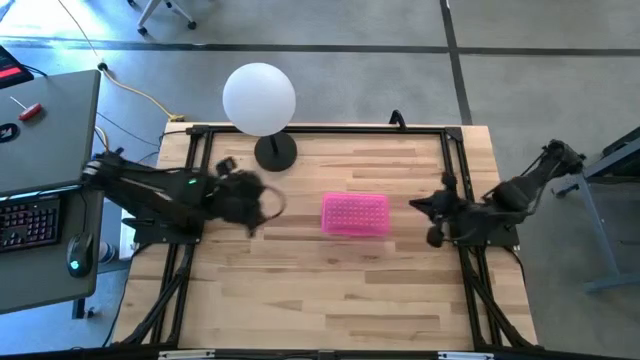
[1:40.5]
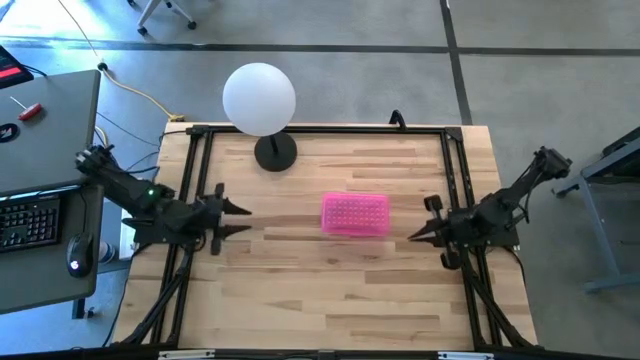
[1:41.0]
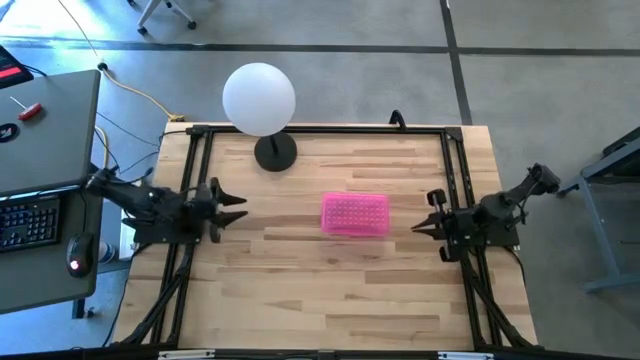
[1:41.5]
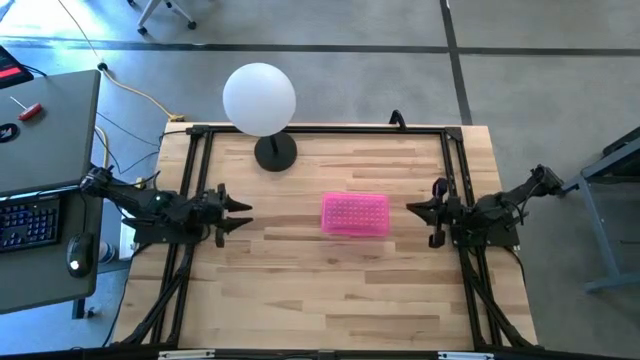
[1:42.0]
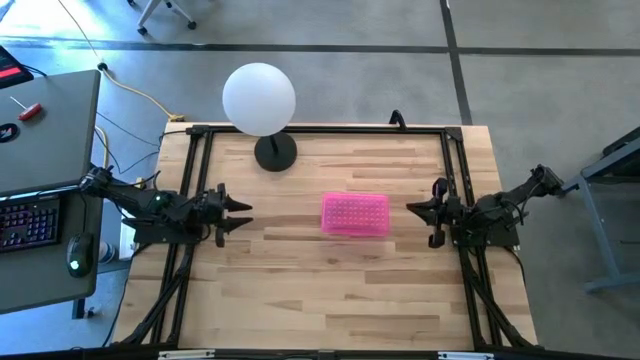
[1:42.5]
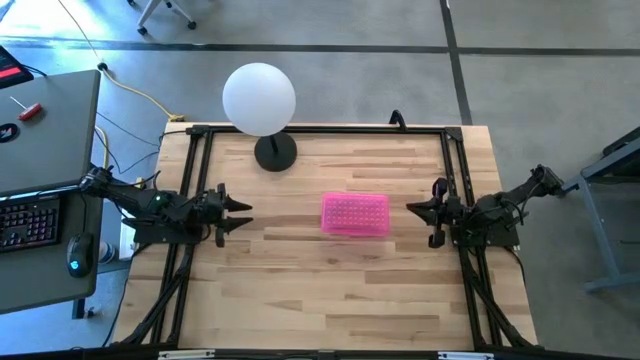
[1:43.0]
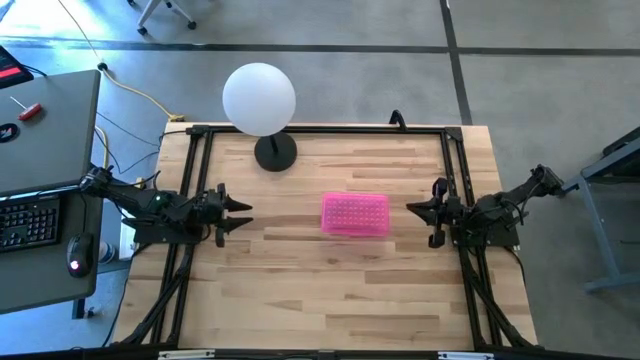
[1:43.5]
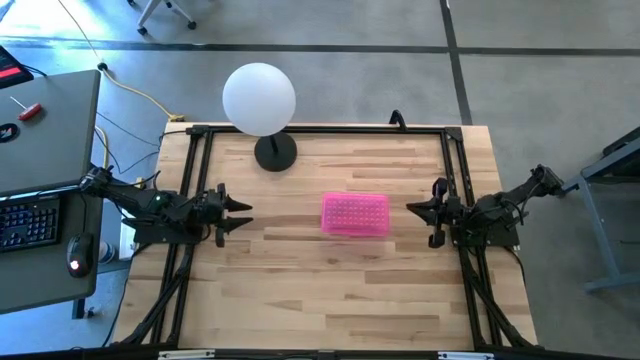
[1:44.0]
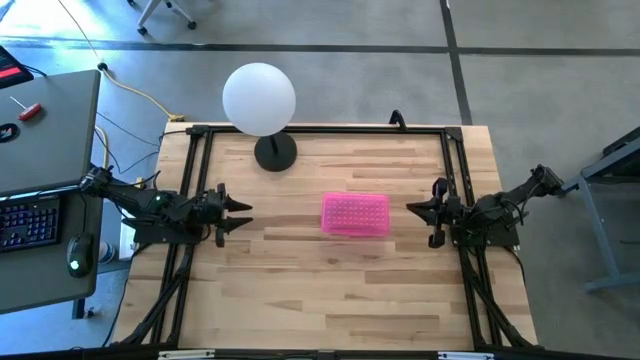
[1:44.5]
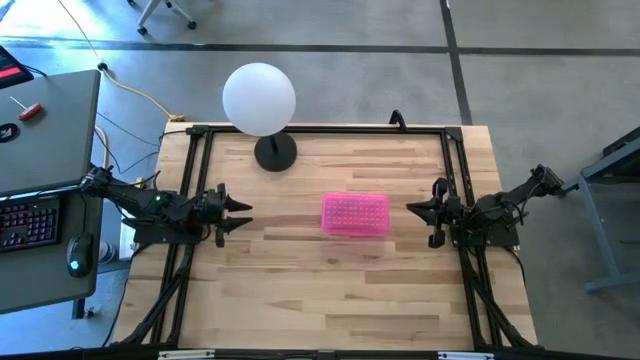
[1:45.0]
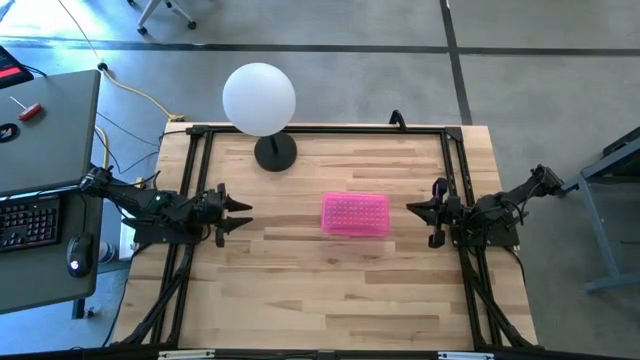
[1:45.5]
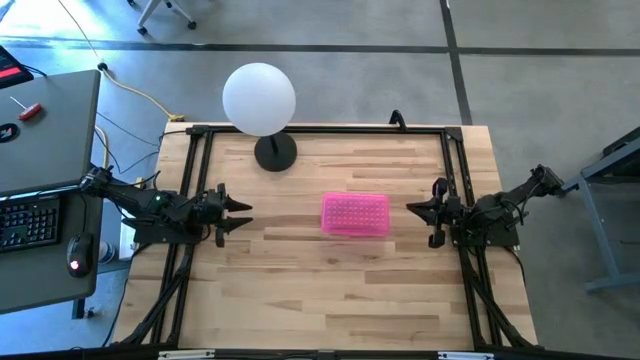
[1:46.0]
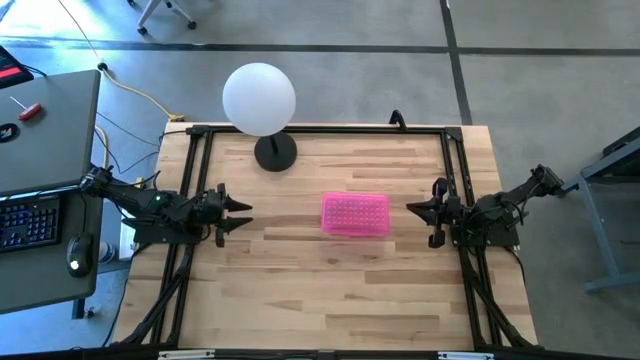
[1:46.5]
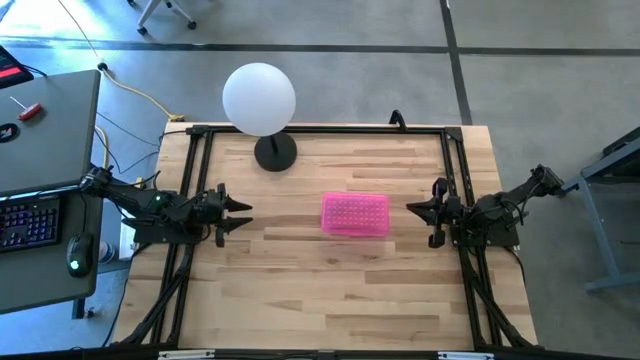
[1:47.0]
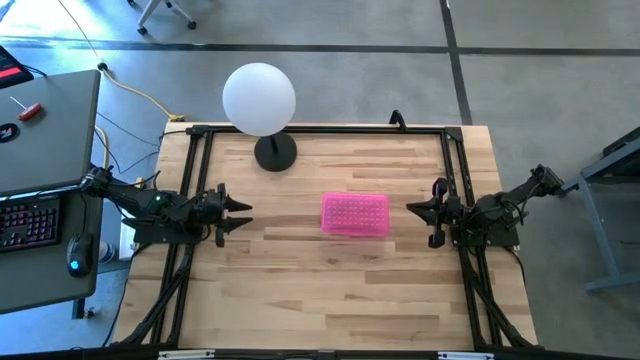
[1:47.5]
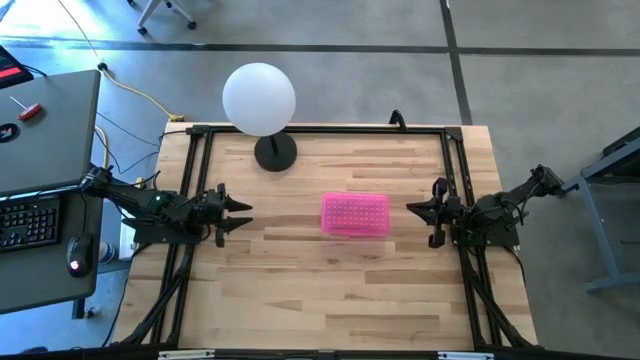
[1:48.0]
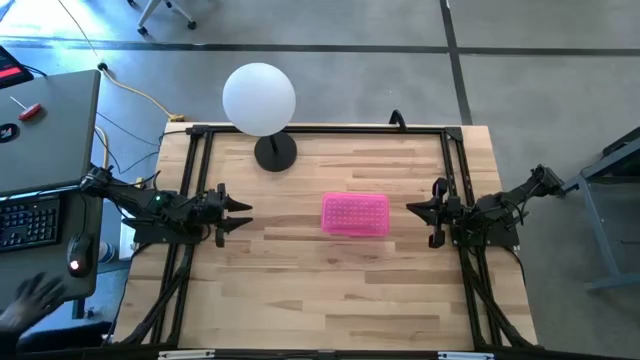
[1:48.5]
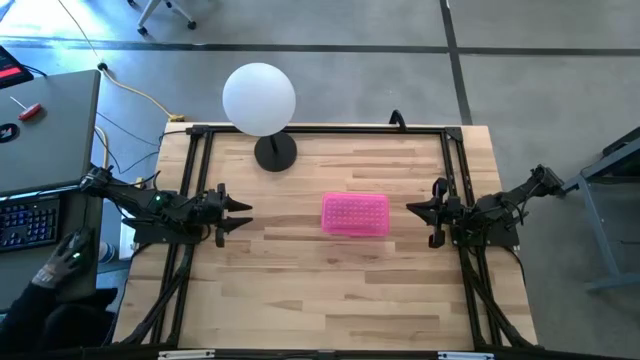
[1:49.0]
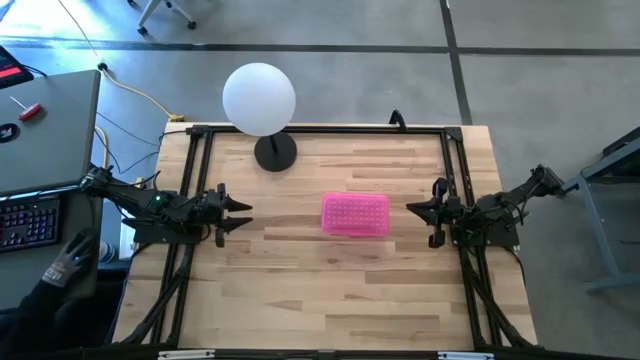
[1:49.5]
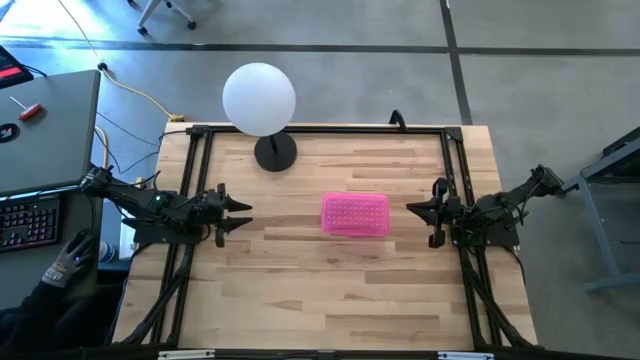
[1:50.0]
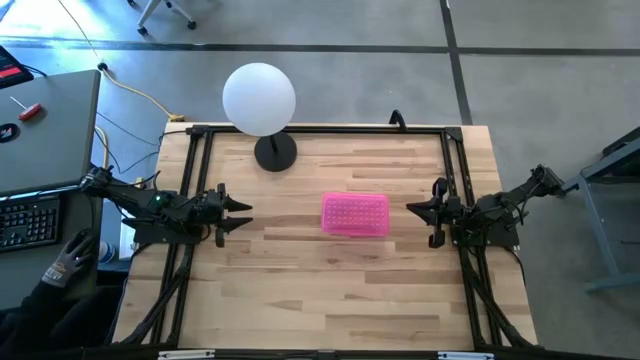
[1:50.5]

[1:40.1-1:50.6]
Task: Pick & place school supplies into a supply box
Return to Home Position

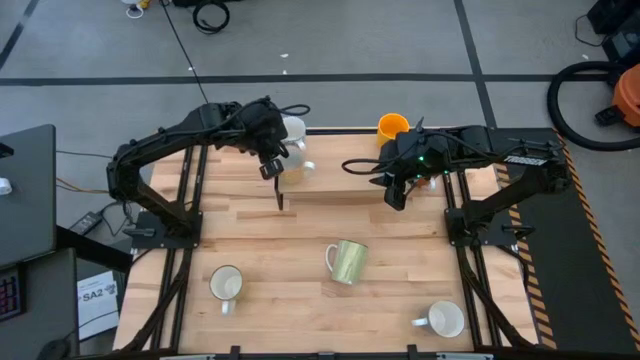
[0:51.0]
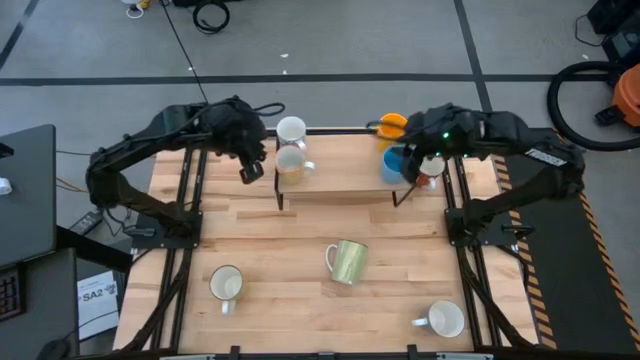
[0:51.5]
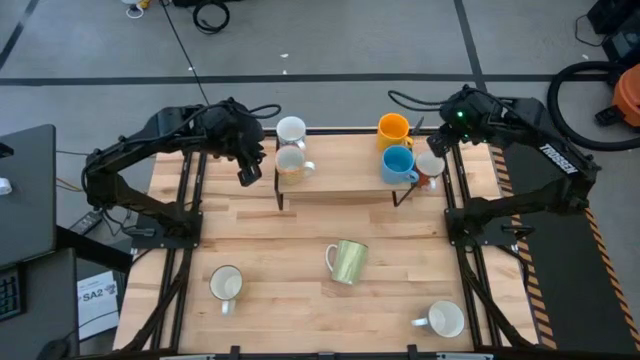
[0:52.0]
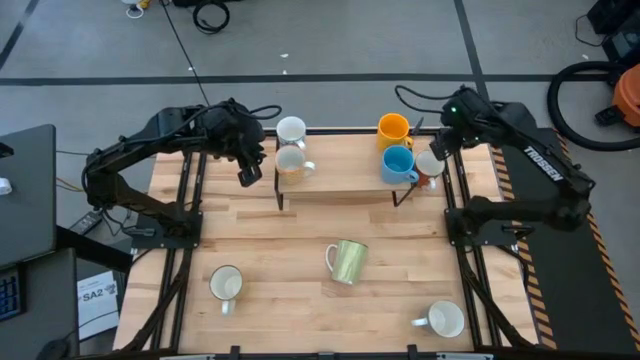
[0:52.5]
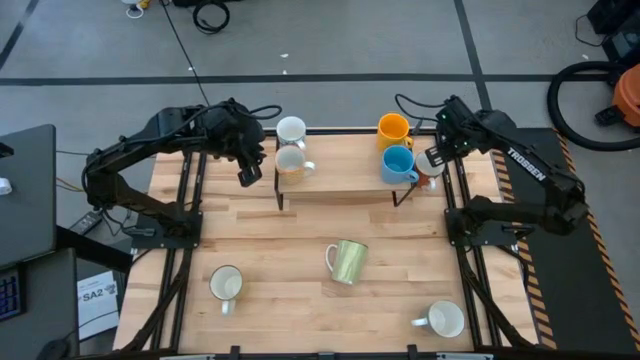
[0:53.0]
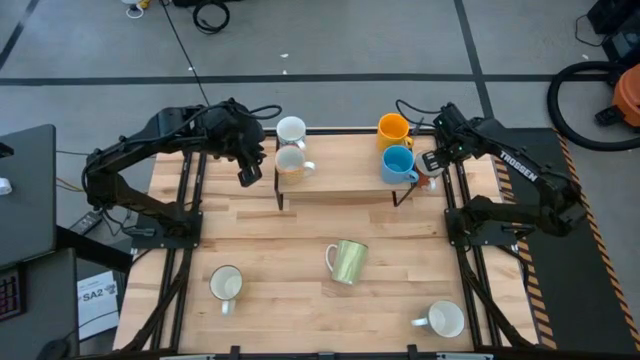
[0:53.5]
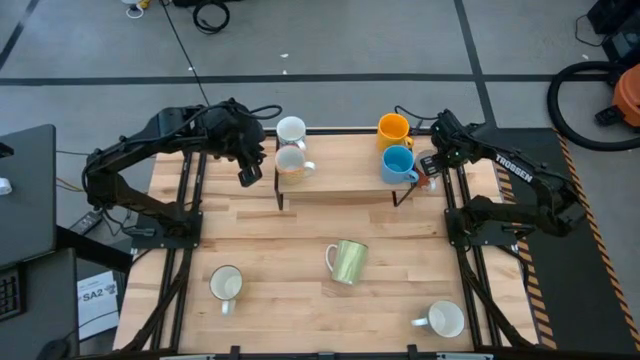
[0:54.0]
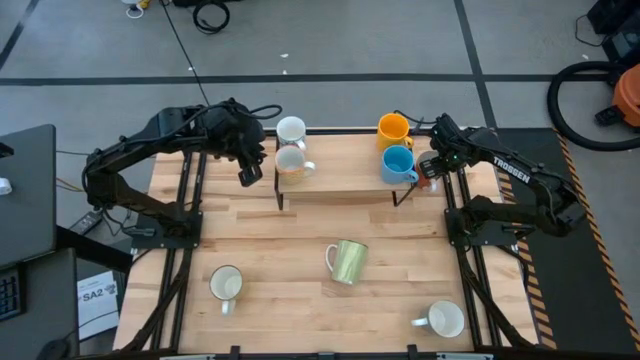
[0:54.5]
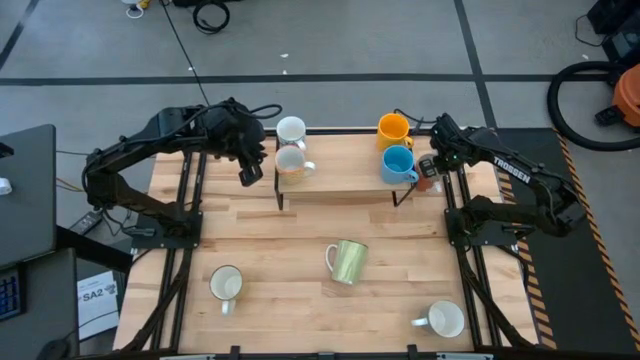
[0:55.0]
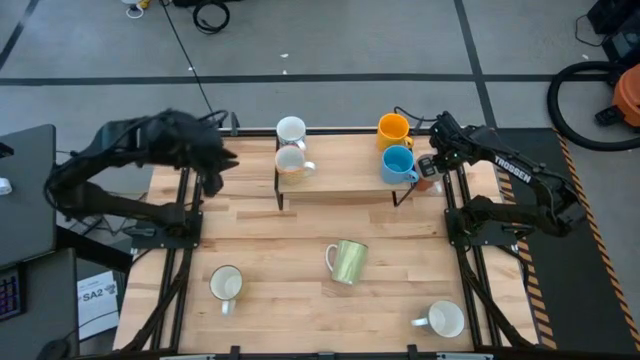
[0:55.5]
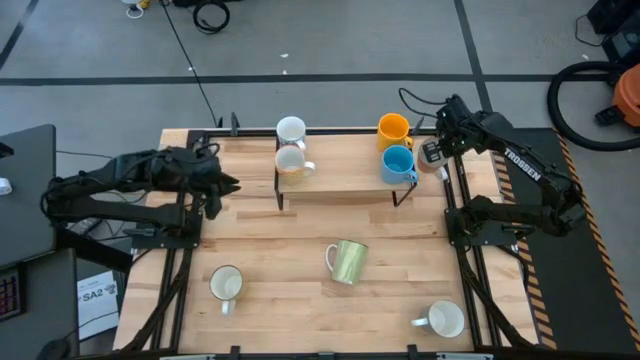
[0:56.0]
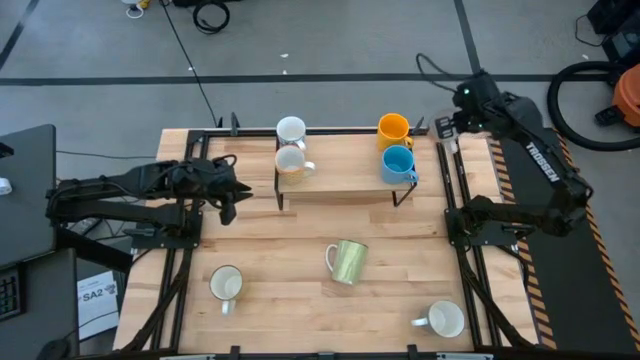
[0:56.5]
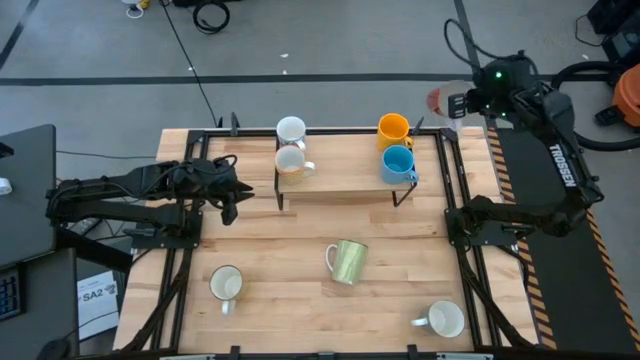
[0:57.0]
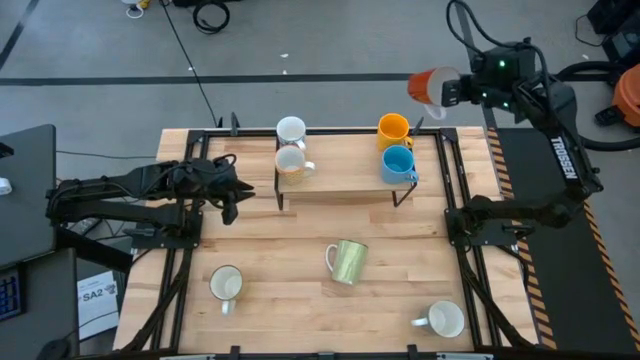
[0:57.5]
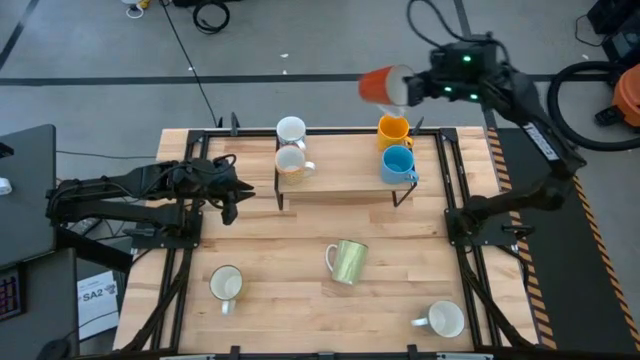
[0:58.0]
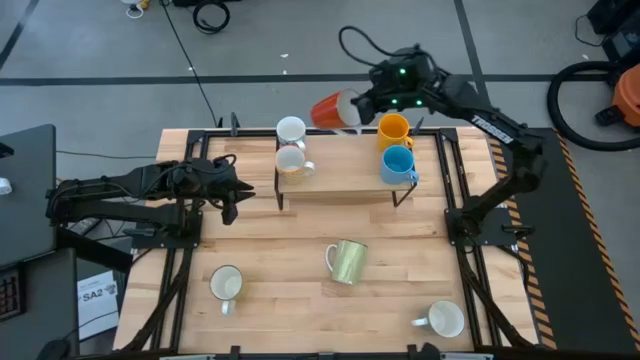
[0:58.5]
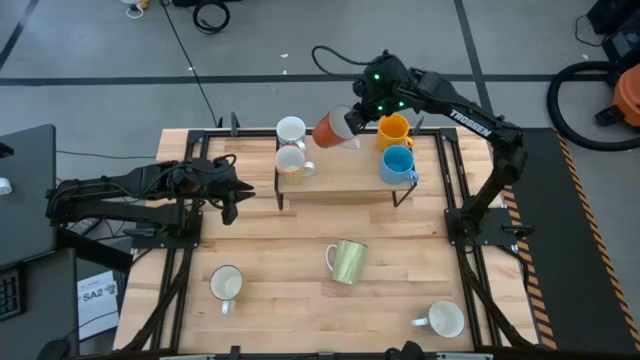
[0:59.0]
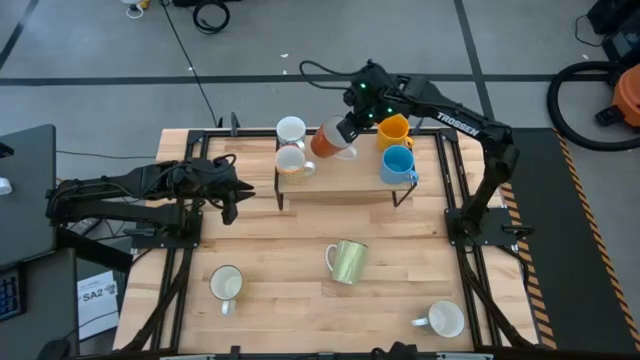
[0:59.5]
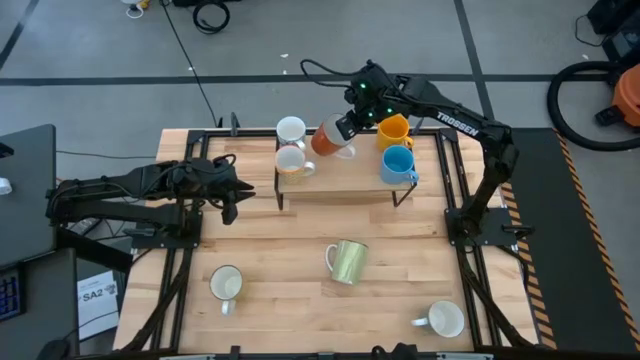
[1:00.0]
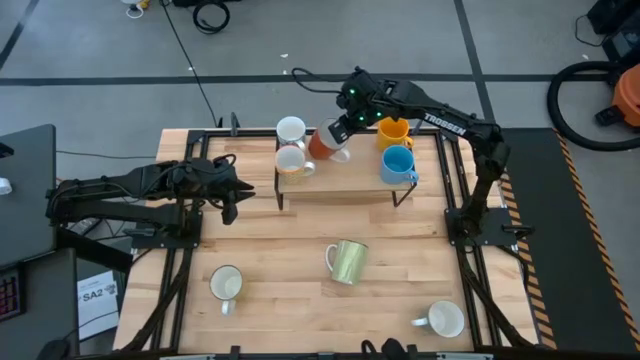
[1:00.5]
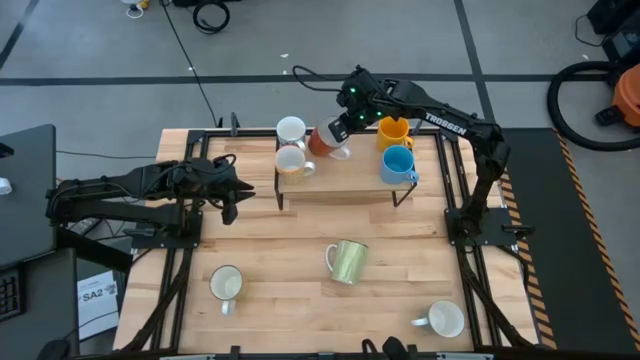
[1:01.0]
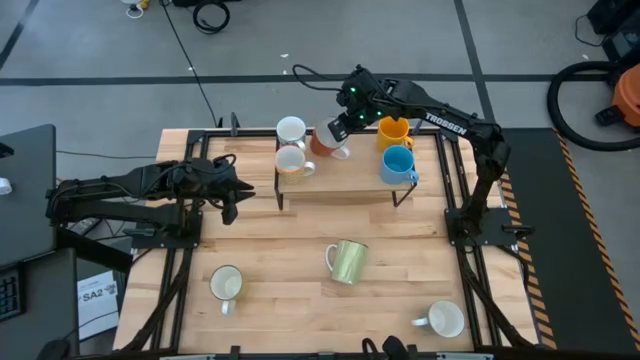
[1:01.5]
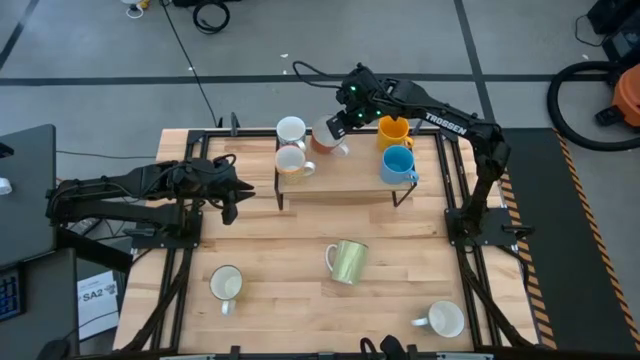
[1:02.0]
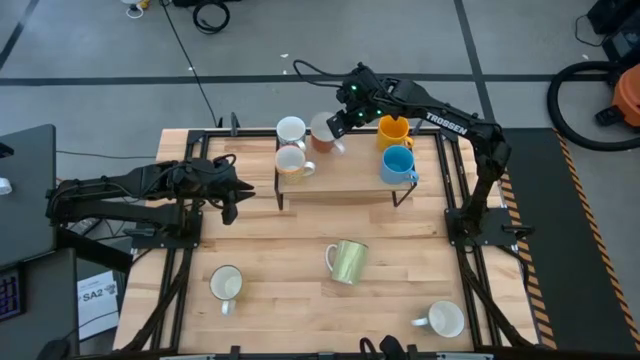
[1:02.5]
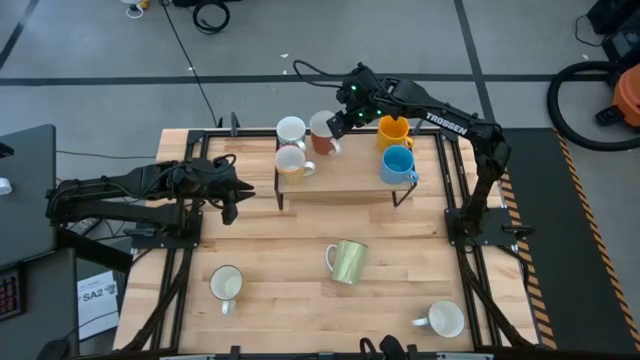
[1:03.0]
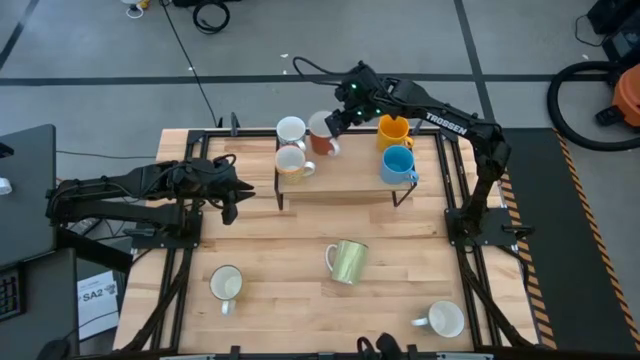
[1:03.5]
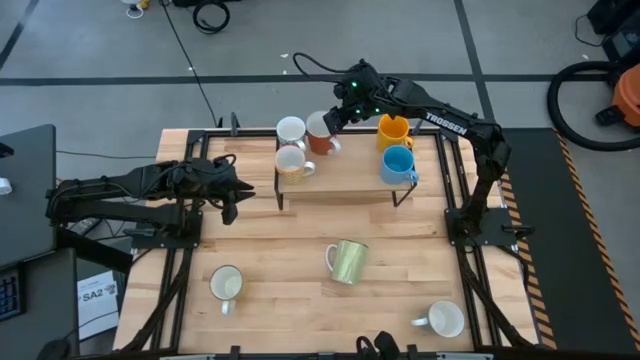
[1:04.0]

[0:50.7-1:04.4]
Task: Place coffee mugs
Put the brown mug on the shelf
